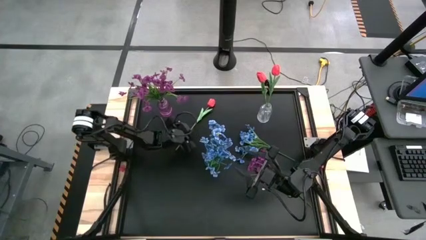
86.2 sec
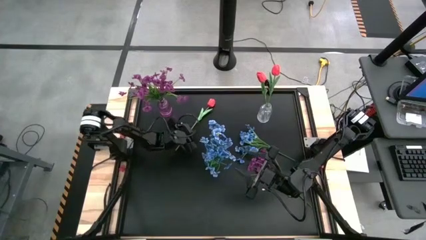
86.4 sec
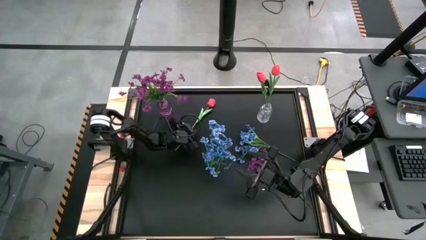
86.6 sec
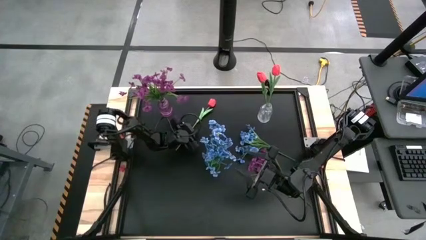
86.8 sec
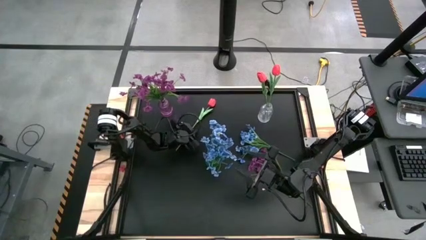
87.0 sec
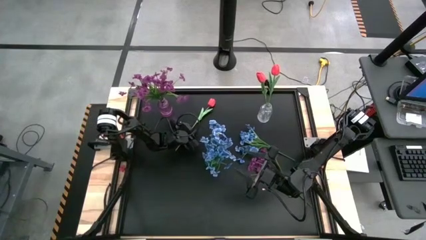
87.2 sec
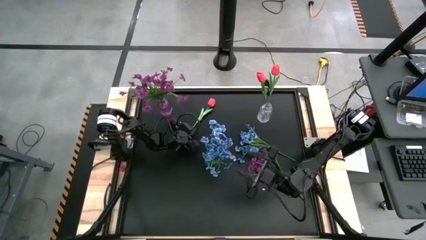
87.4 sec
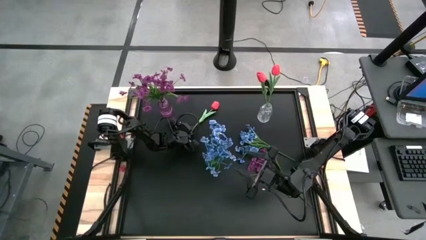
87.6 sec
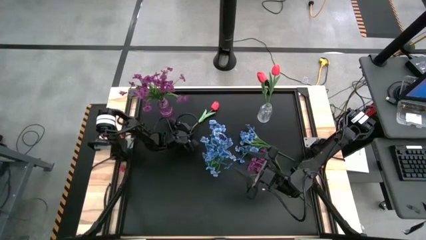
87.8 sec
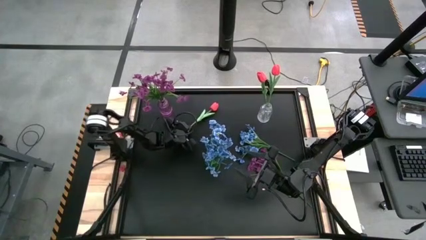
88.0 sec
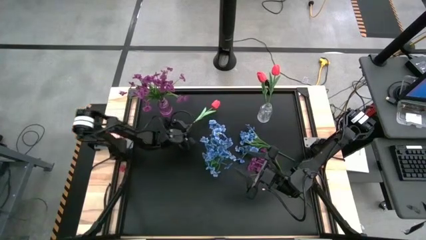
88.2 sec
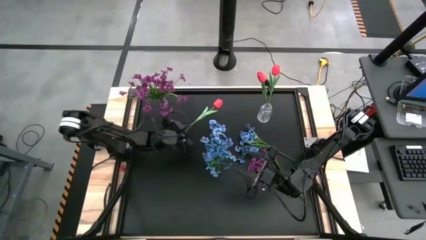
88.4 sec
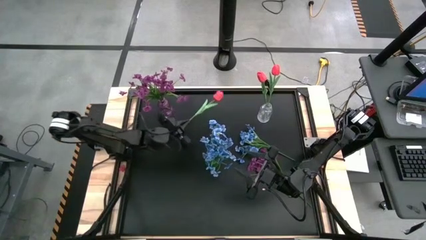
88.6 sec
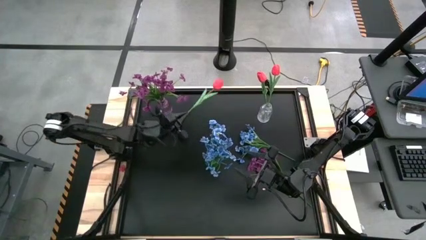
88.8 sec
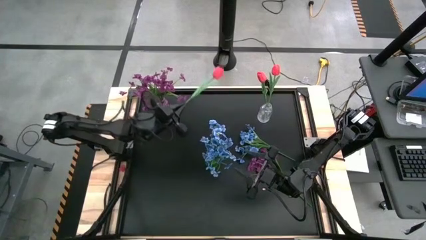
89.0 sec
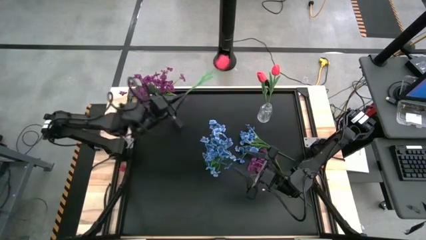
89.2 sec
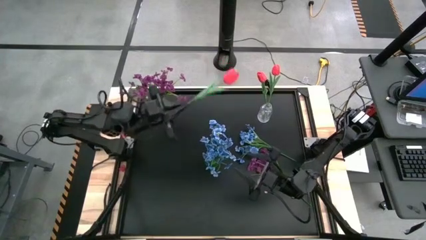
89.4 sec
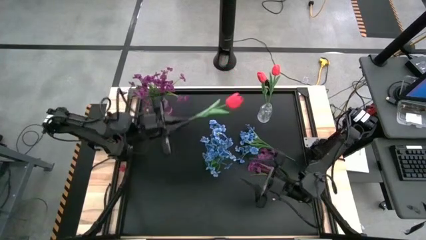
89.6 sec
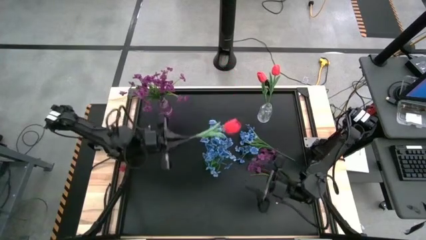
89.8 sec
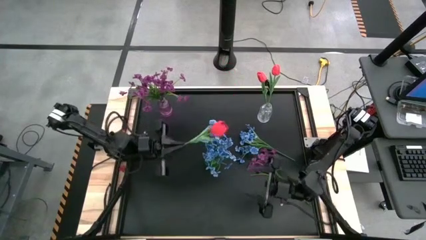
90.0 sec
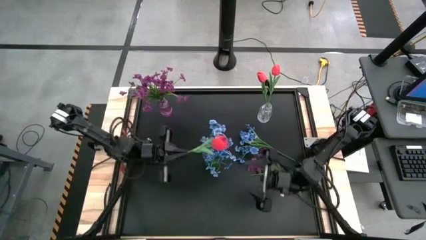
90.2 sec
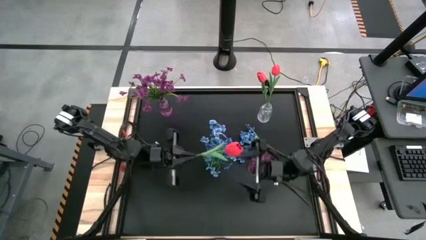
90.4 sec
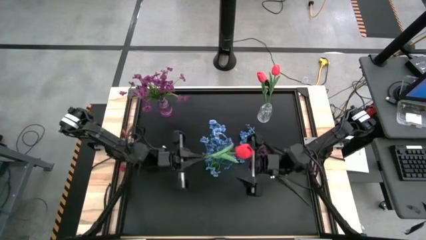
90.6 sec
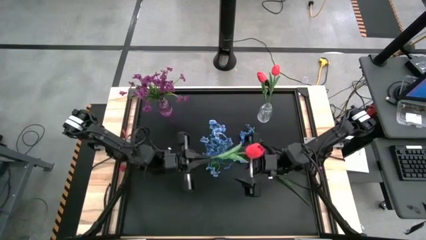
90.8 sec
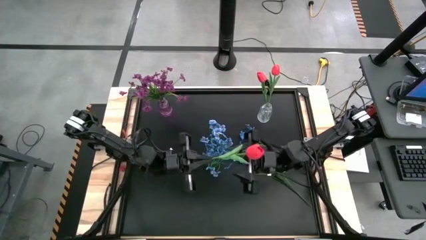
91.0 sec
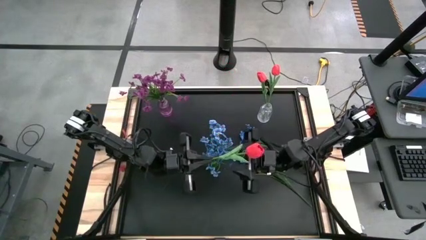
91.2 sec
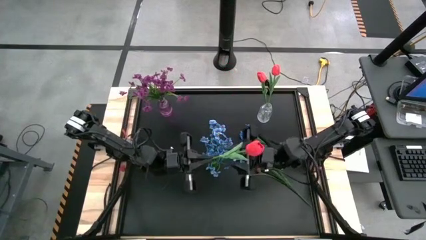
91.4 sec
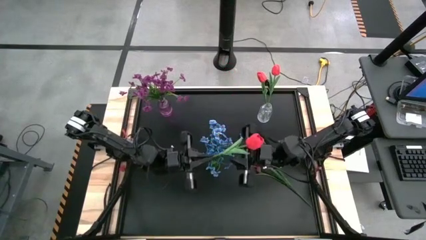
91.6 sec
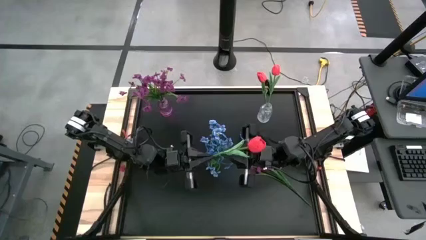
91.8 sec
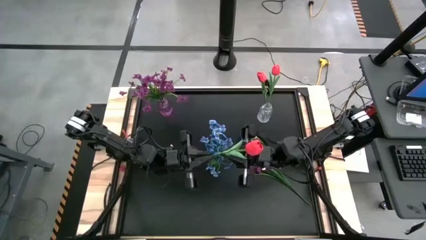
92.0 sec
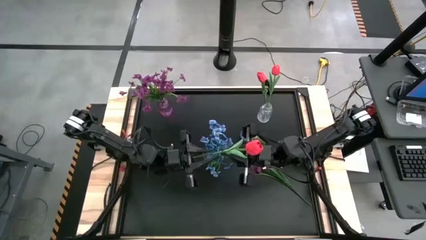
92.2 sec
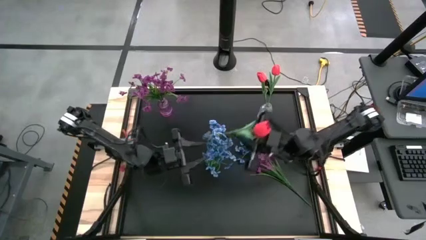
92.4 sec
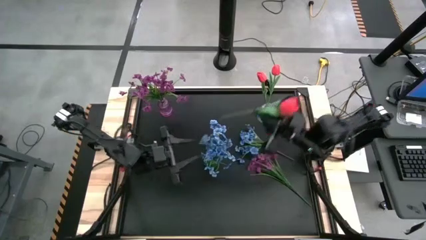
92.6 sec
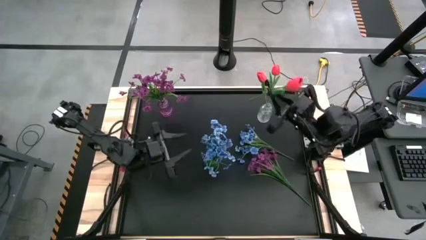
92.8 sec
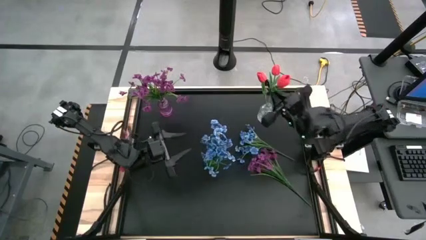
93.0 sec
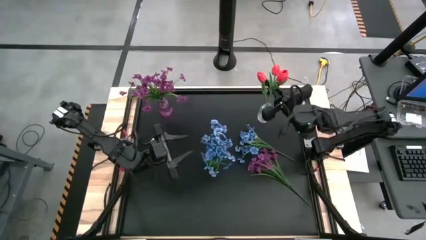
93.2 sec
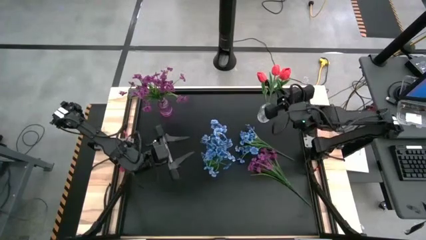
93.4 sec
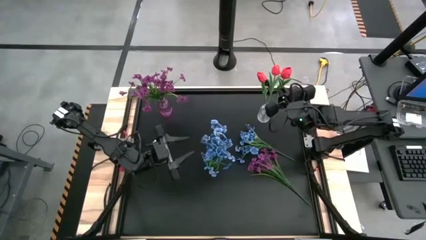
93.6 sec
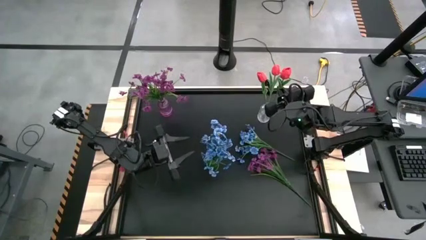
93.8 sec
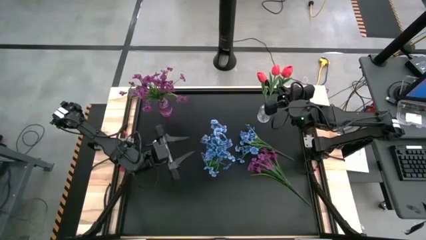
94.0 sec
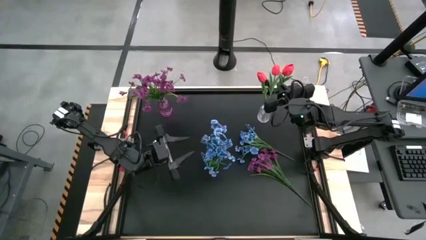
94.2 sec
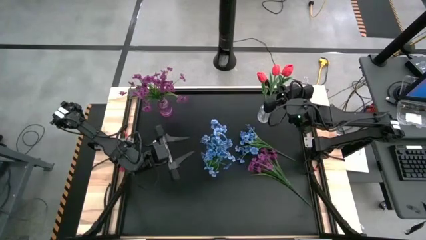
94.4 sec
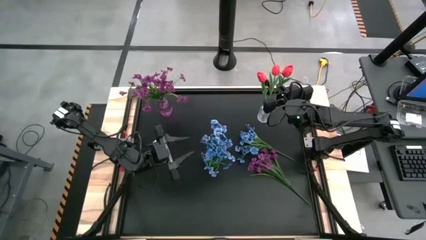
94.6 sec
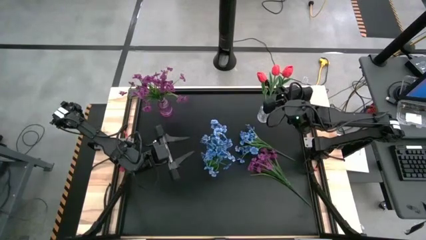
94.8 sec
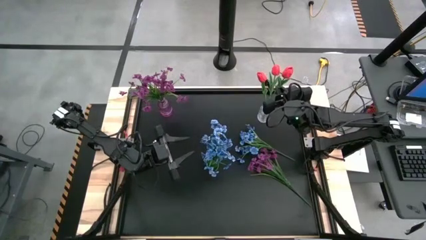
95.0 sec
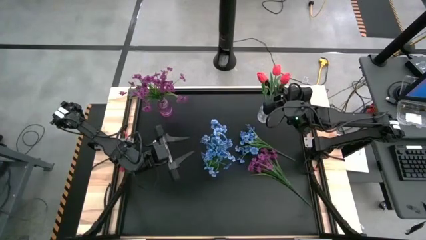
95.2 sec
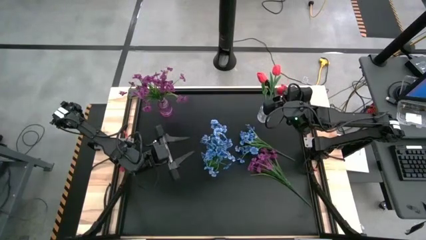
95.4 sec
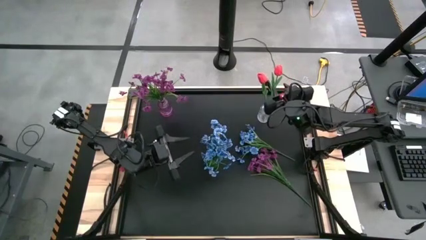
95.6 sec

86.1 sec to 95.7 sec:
Task: Sort flowers into vase by color
Put the red flower into the transparent crystal vase

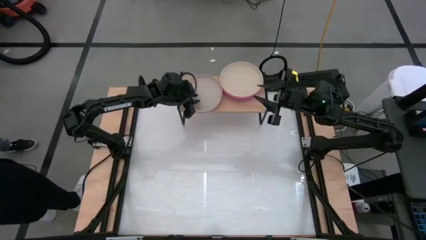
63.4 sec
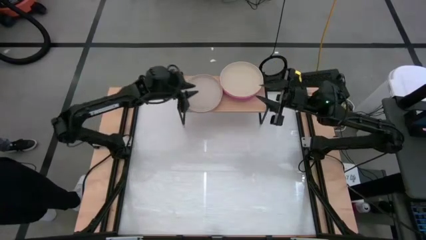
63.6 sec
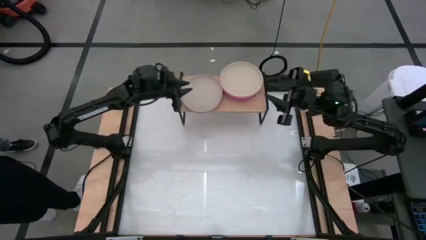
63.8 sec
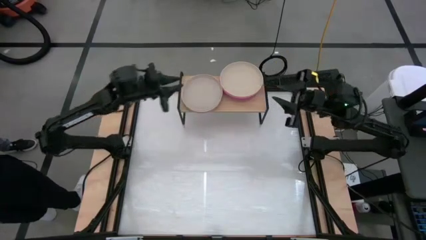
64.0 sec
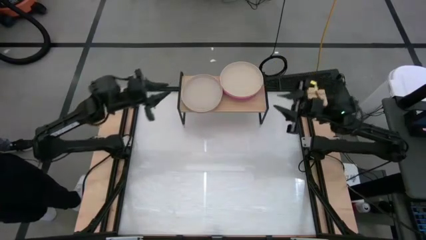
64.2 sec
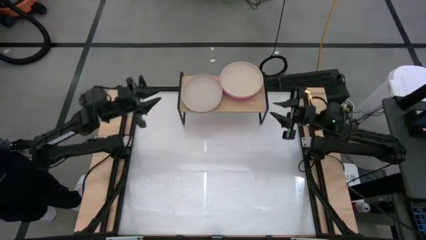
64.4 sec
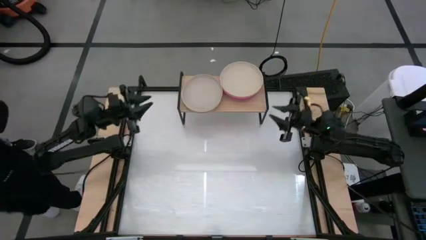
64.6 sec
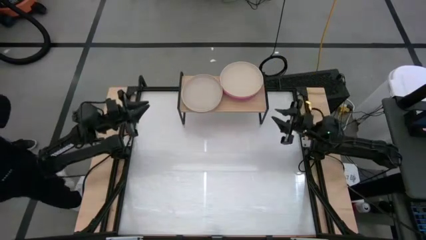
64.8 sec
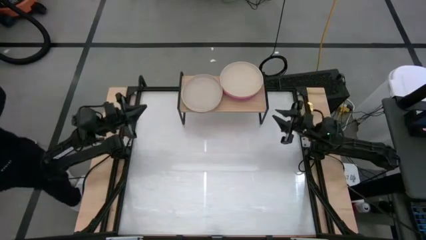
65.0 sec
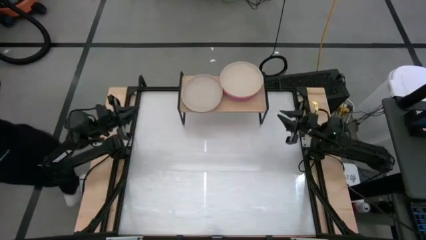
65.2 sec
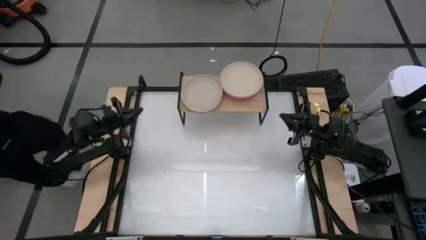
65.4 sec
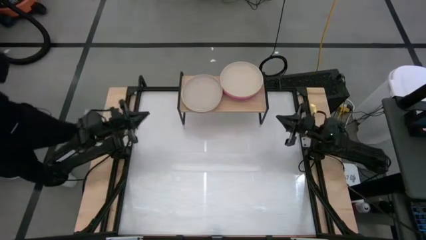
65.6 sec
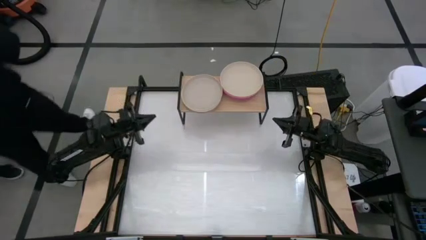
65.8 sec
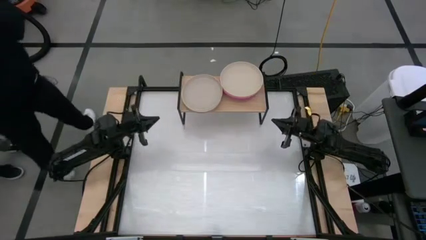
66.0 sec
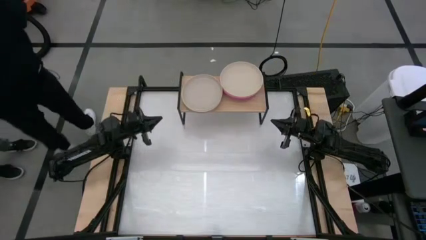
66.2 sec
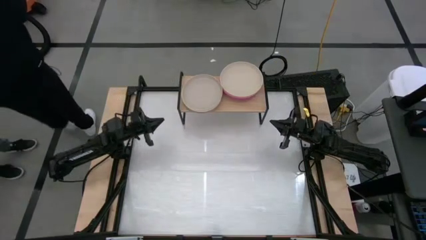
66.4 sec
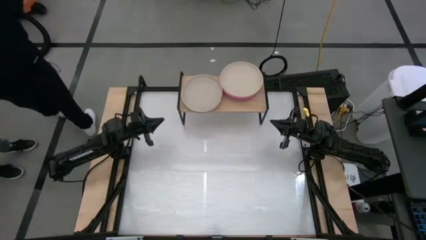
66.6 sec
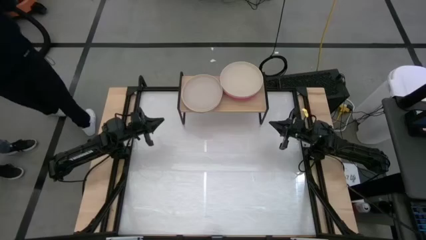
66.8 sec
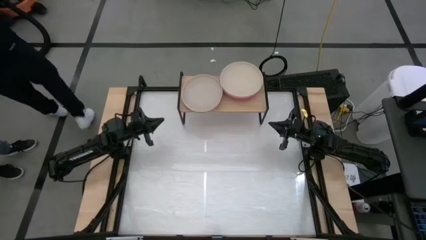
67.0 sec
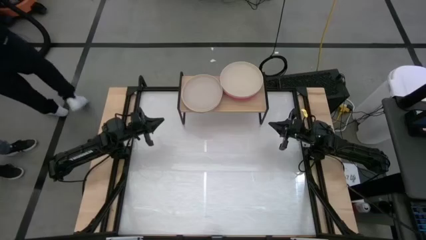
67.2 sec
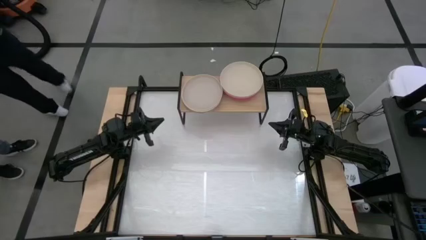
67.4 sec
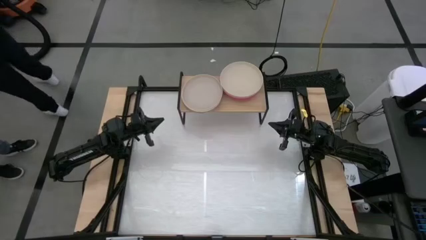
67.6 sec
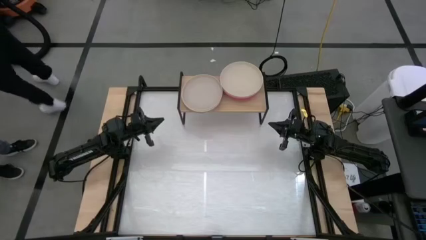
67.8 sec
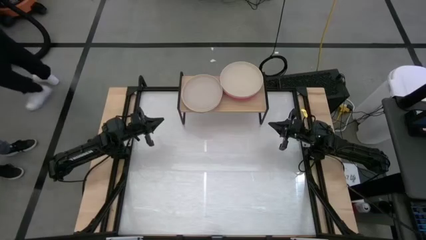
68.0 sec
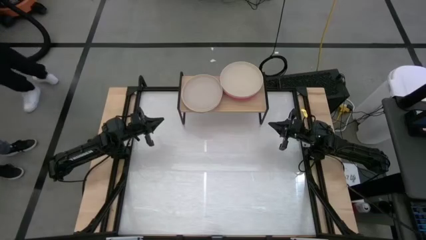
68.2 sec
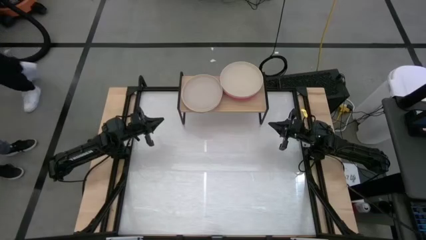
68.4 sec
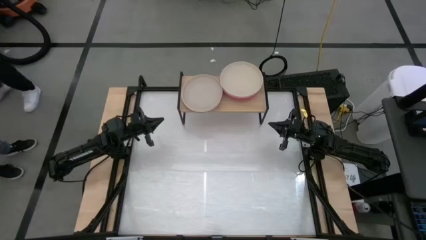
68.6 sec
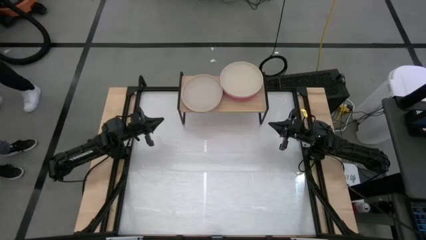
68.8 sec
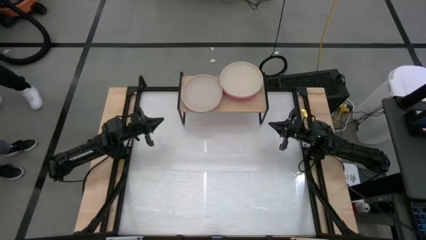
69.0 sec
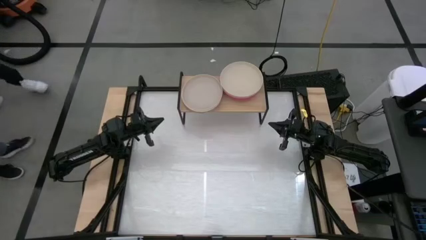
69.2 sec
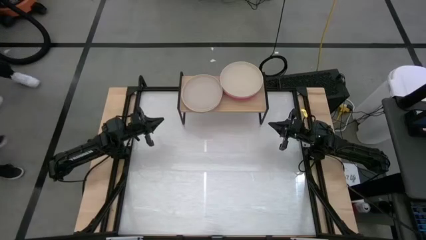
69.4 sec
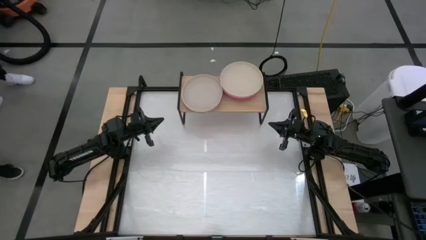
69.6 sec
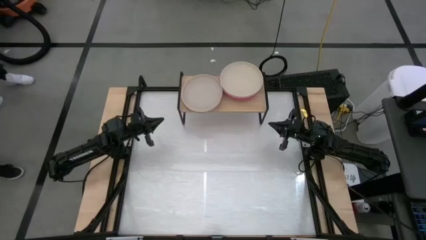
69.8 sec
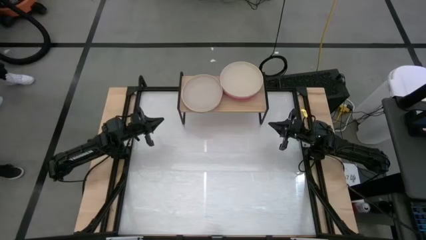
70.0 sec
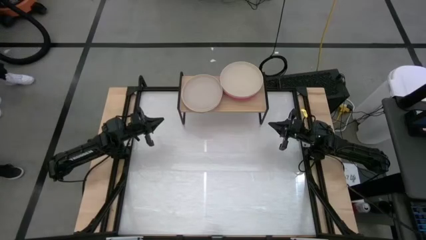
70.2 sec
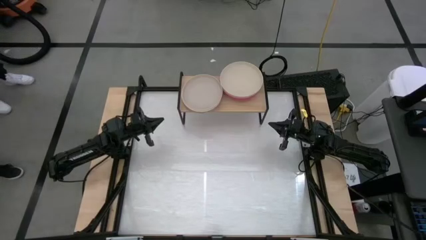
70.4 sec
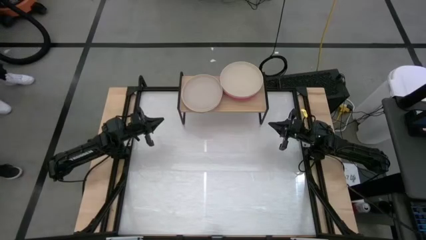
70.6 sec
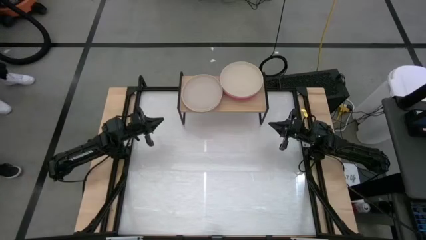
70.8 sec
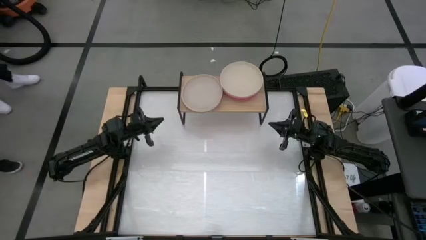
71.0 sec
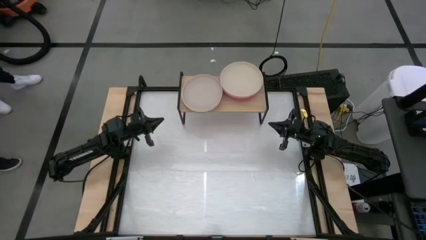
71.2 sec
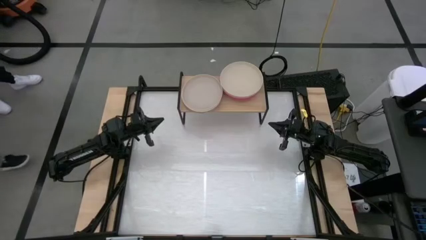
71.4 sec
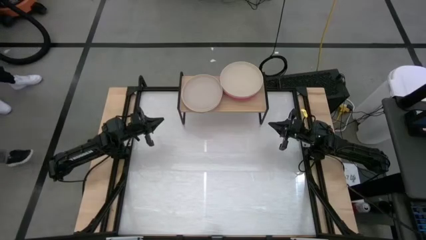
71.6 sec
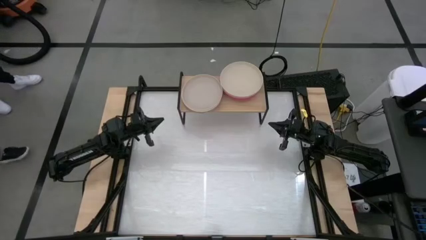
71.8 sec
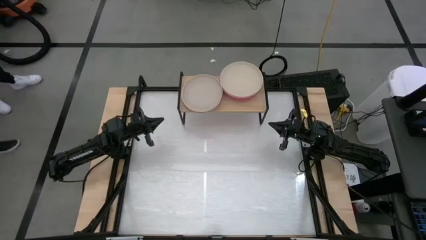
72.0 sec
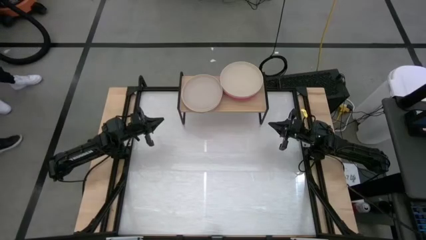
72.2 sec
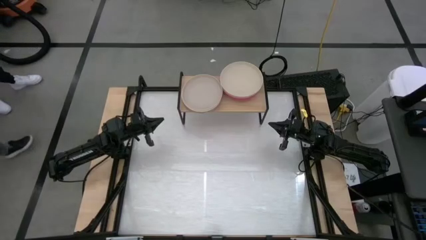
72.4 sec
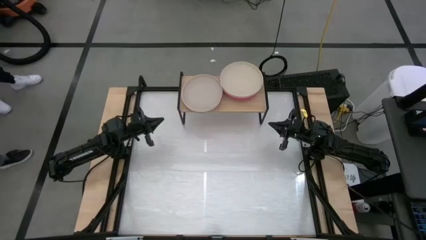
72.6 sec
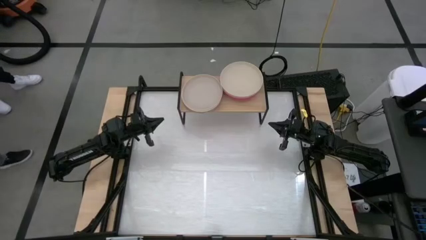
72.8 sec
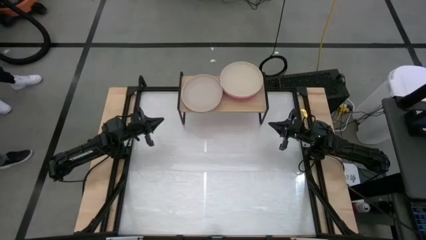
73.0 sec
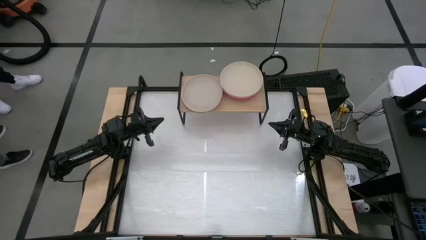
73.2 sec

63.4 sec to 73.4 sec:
Task: Place and stack plates onto a shelf
Return to Home Position
